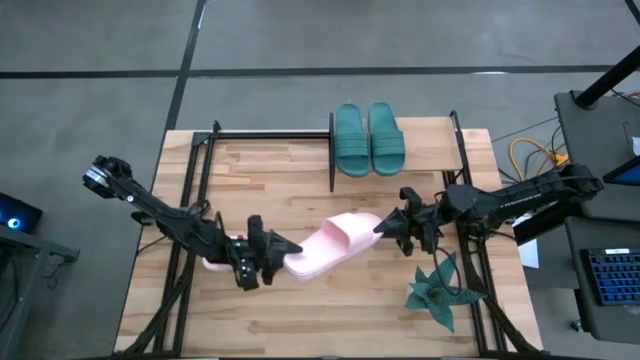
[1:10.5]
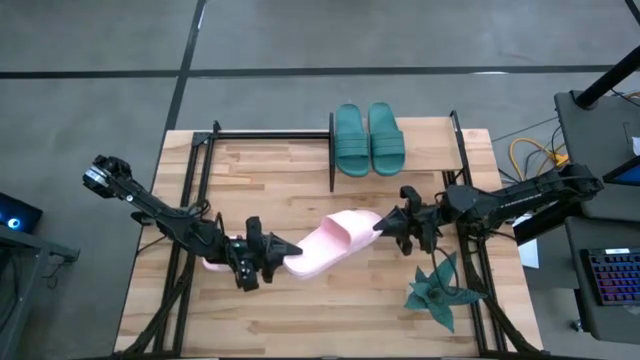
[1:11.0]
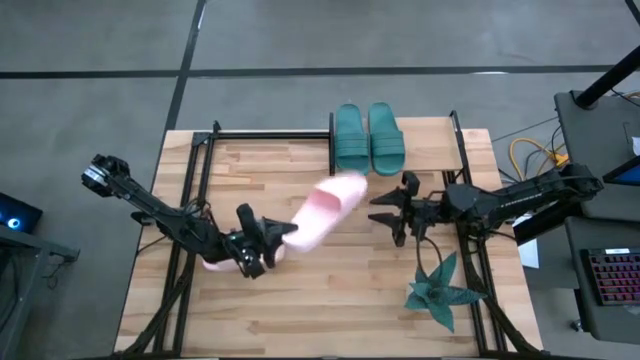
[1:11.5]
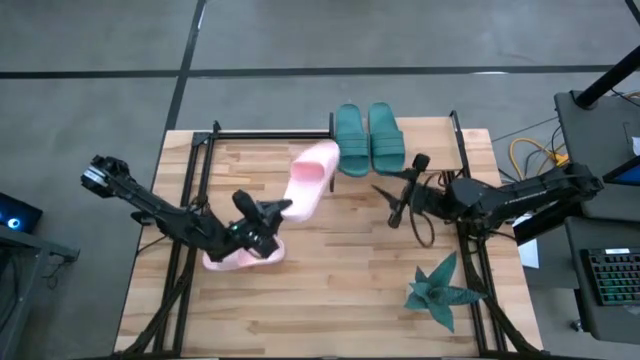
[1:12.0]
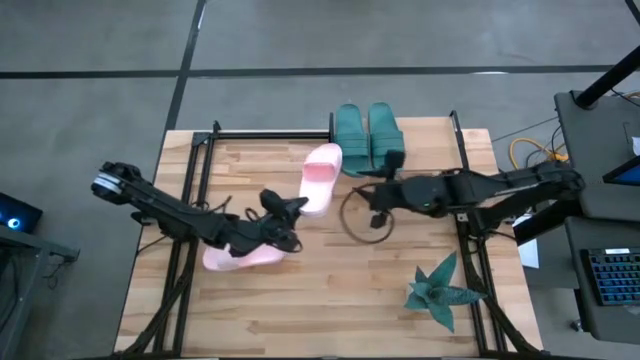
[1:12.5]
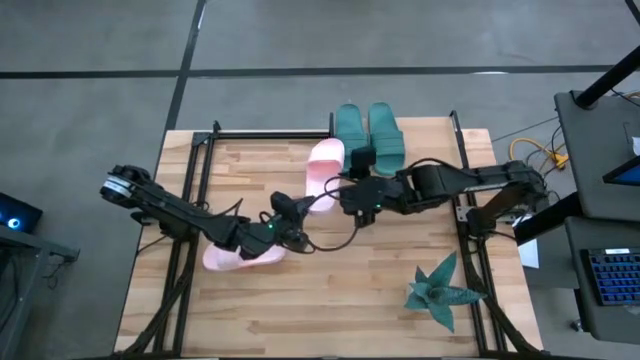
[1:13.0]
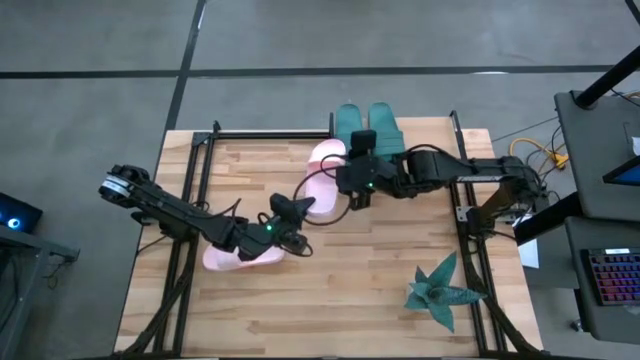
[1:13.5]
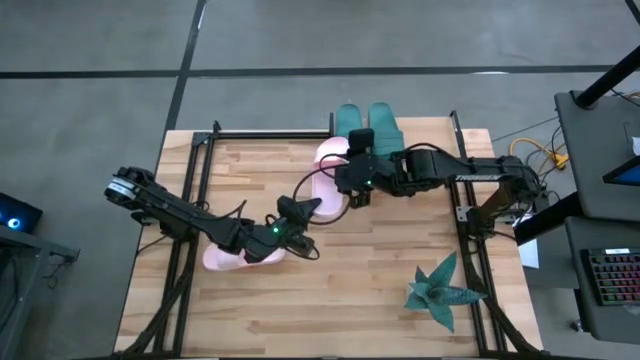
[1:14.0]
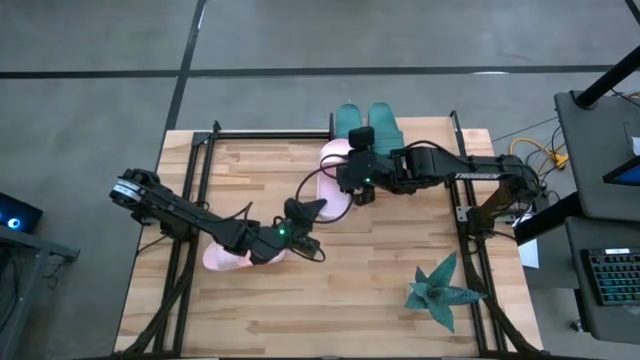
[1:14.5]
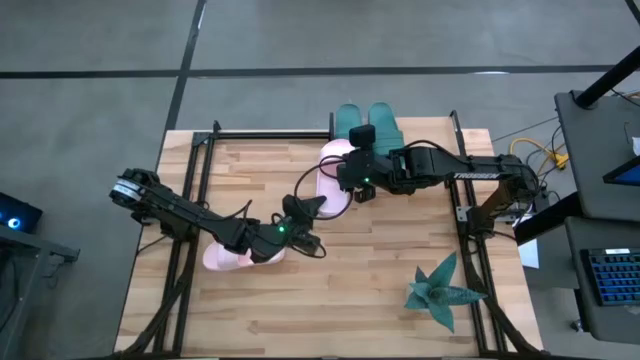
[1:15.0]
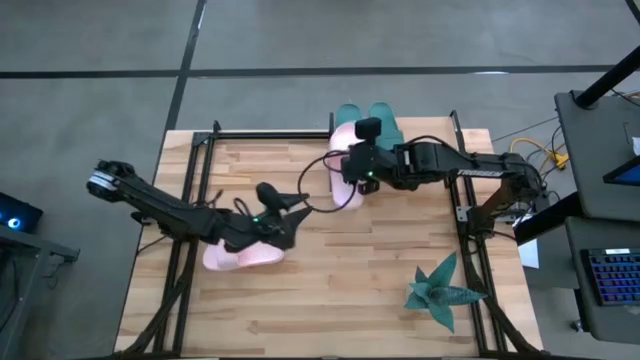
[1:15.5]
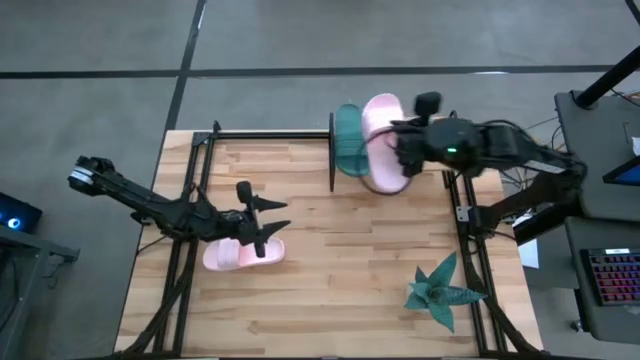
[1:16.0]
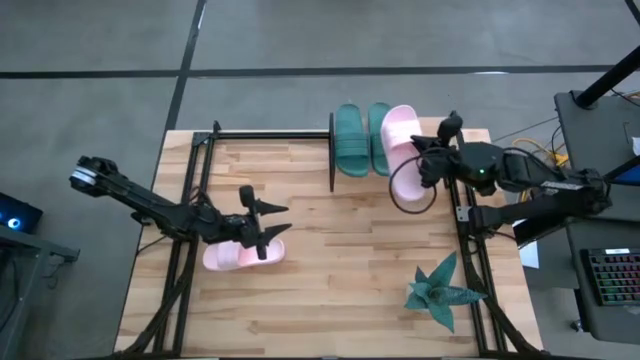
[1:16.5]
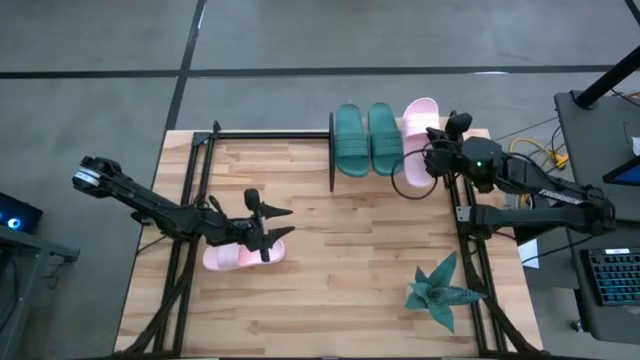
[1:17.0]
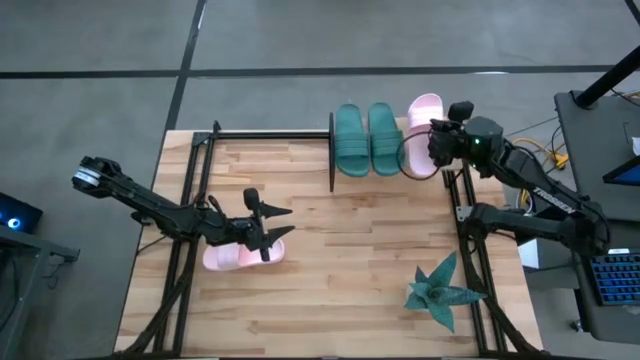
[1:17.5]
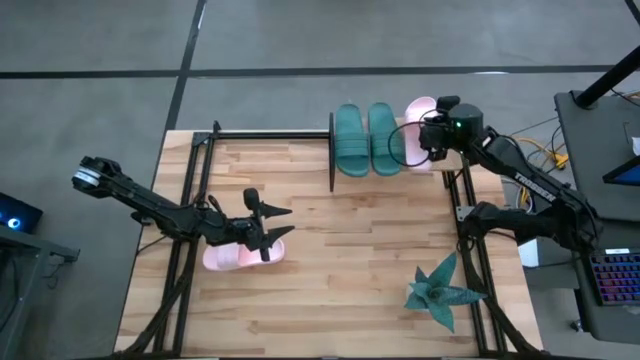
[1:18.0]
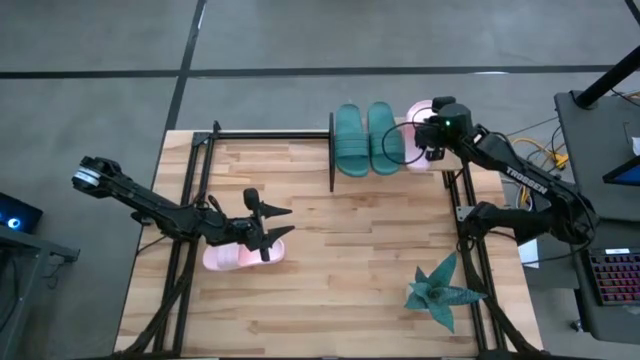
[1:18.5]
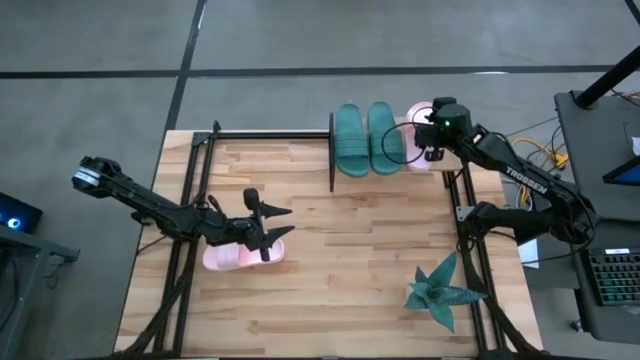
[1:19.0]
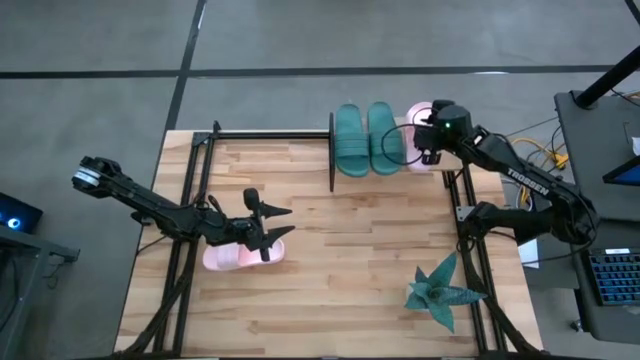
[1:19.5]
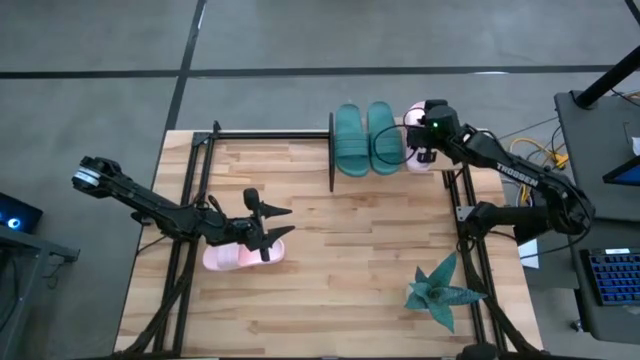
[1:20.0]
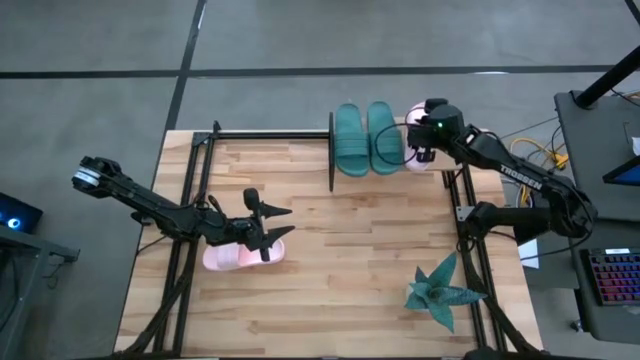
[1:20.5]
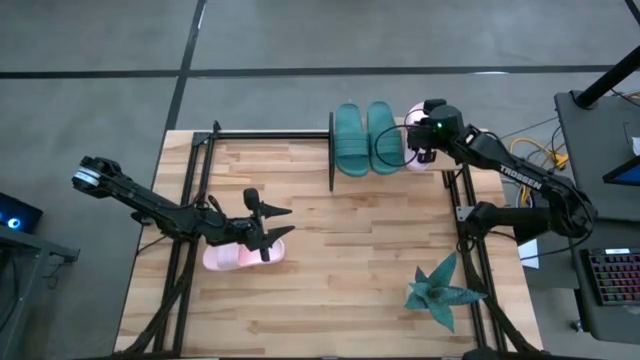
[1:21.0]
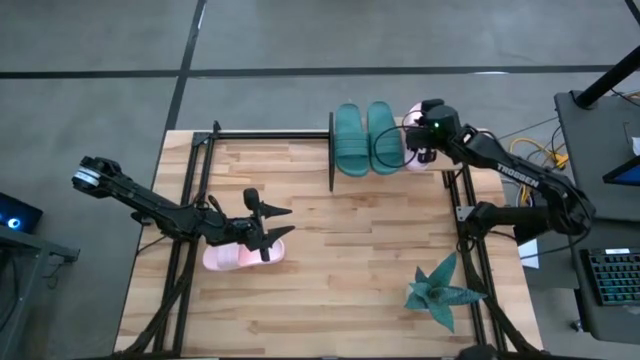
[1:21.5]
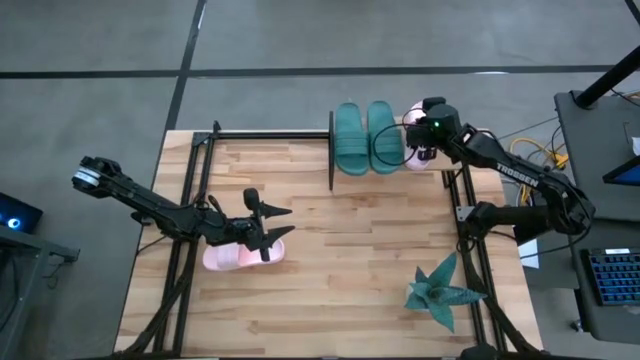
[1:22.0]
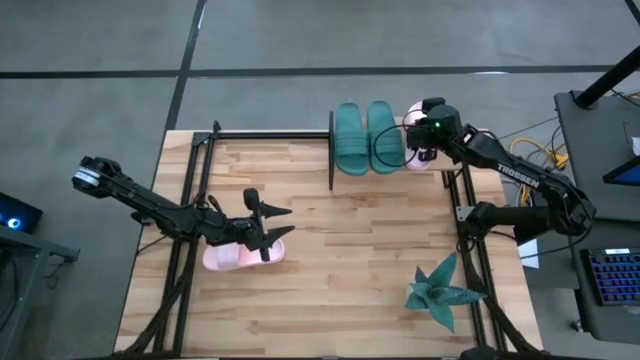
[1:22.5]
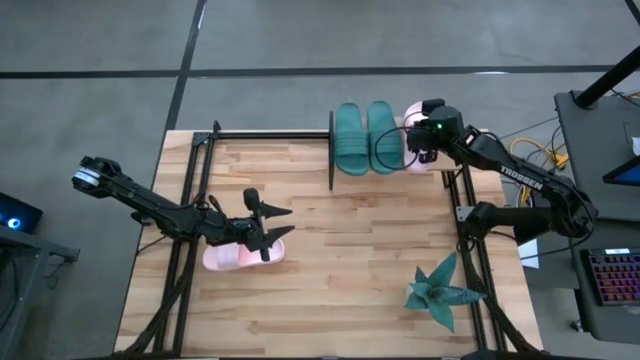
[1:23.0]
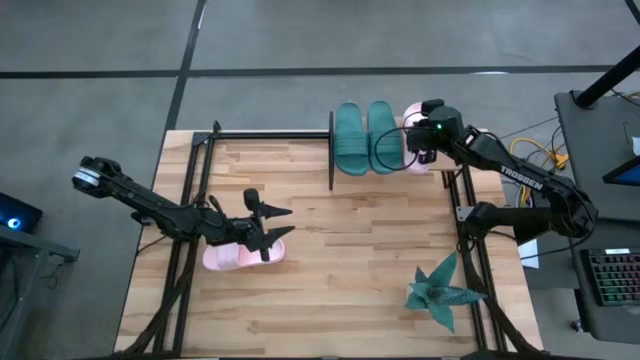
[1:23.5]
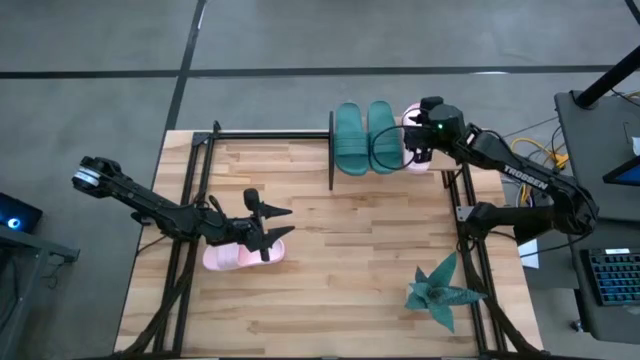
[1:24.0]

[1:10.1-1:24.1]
Task: Pick and place slides into the shelf
Put the top pink slipper on the shelf

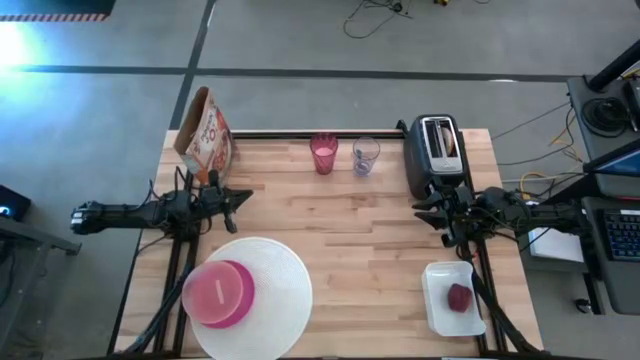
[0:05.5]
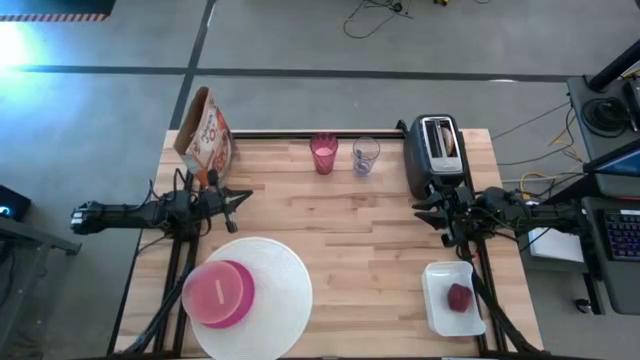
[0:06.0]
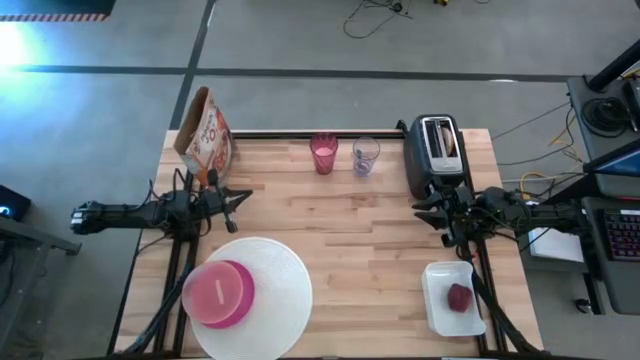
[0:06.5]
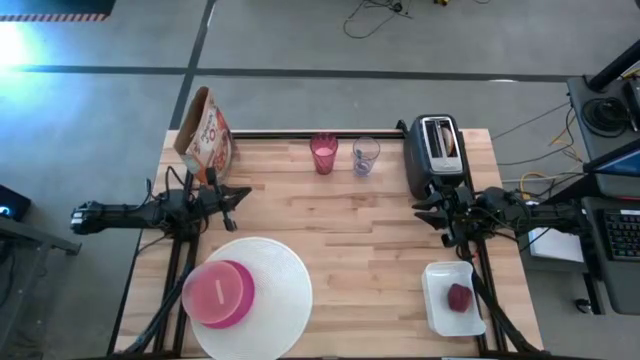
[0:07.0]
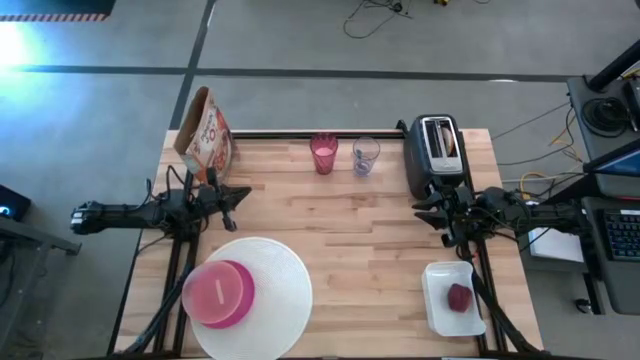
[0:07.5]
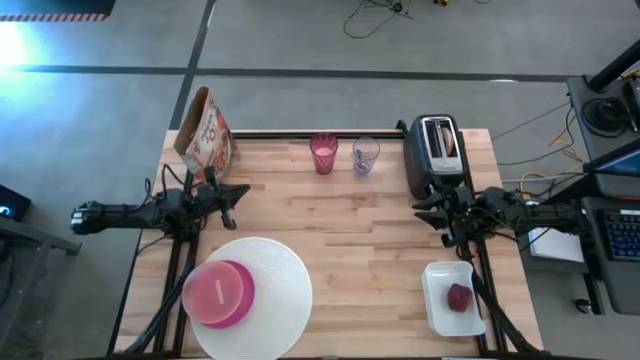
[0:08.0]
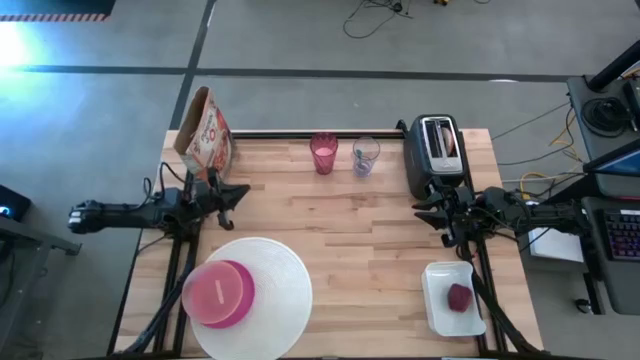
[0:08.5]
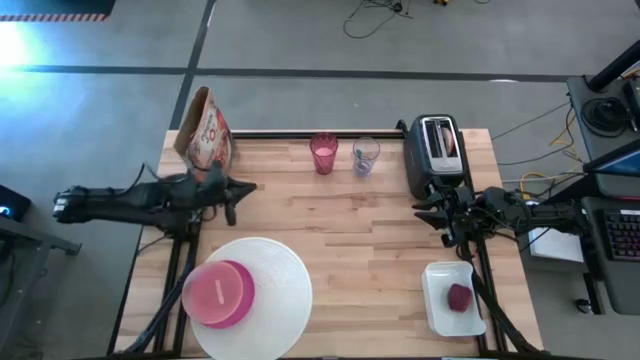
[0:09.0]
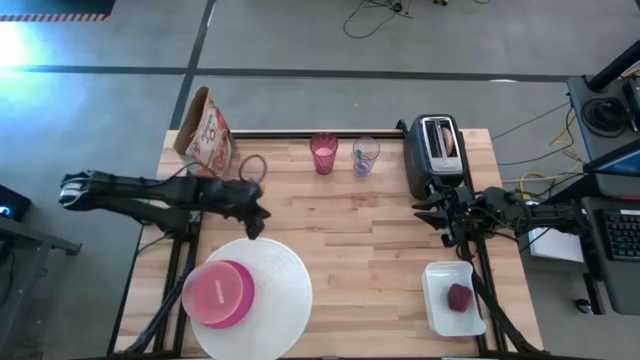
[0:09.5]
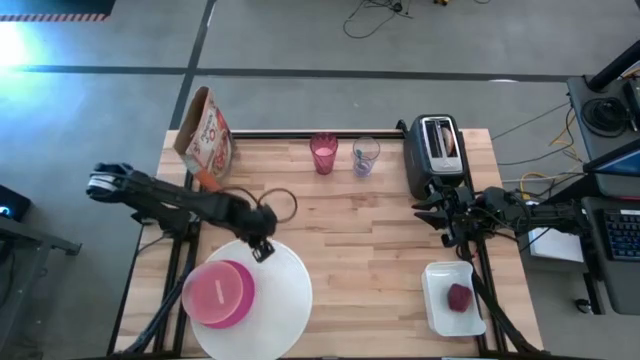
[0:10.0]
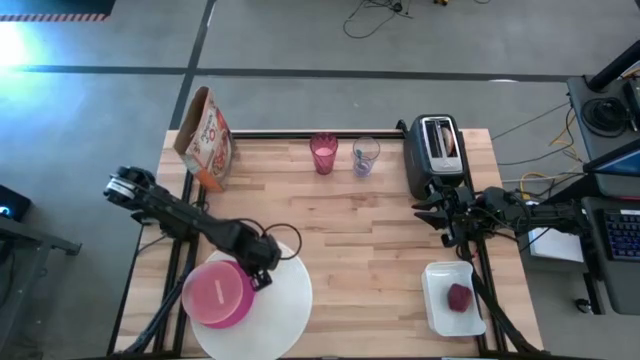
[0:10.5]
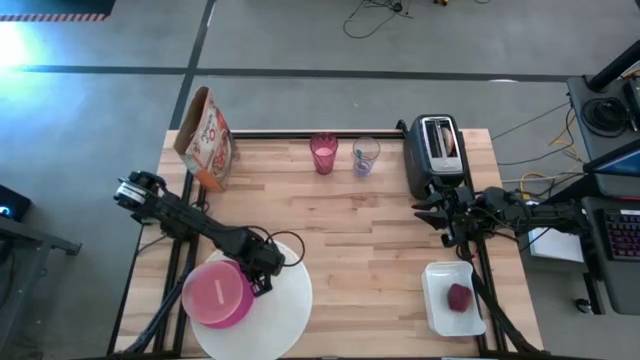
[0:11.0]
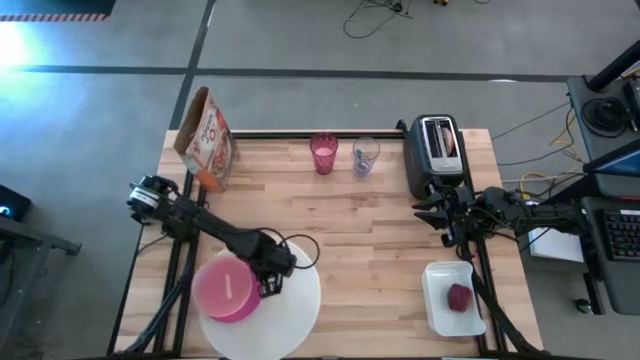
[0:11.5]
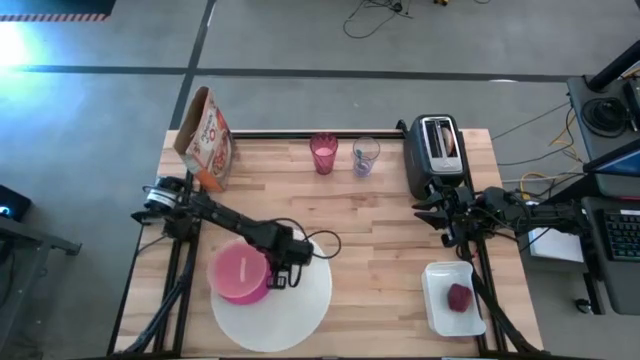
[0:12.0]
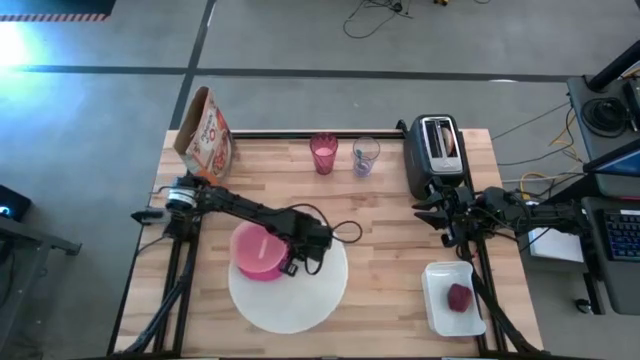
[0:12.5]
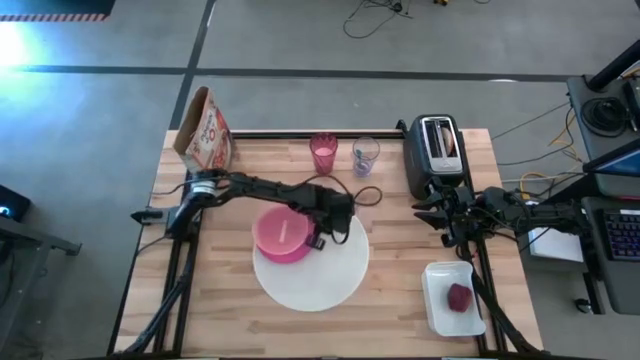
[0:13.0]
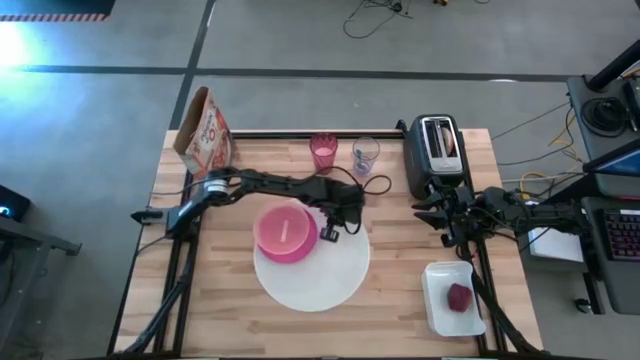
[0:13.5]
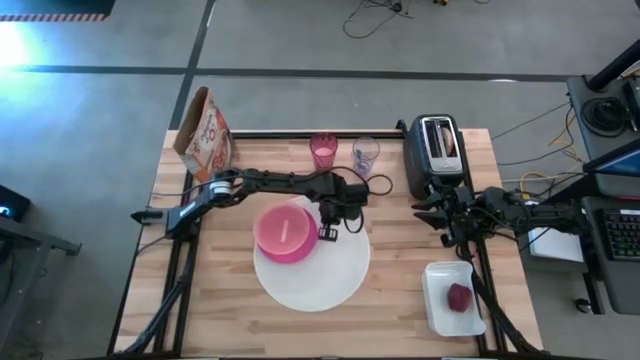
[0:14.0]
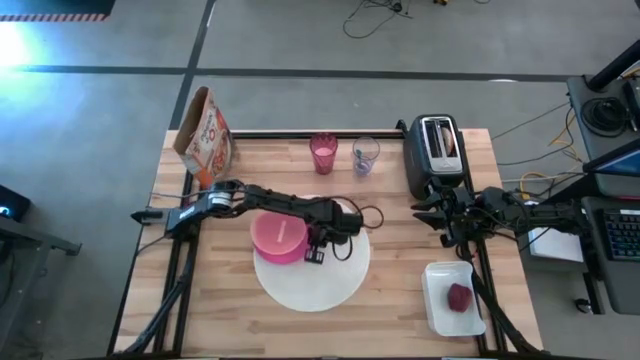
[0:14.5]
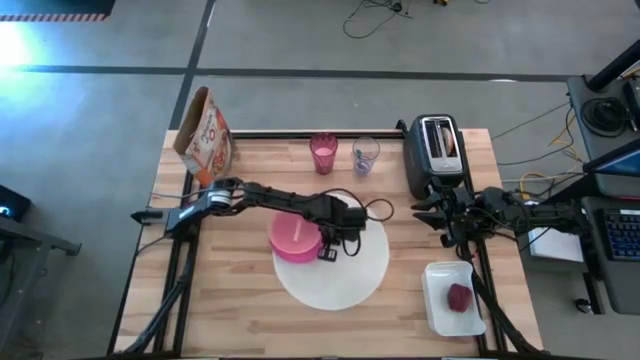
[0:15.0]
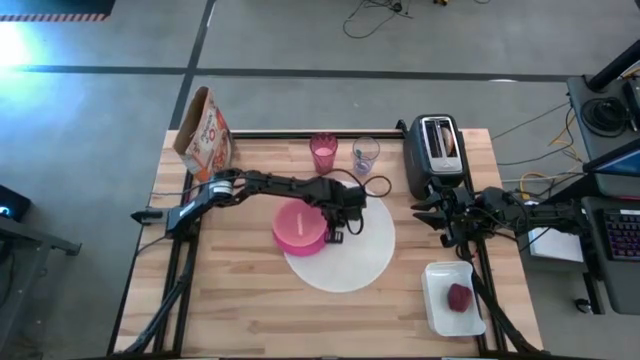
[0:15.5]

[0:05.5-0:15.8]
Task: Arrange a breakfast setting
Move the white table mat to the center of the table
